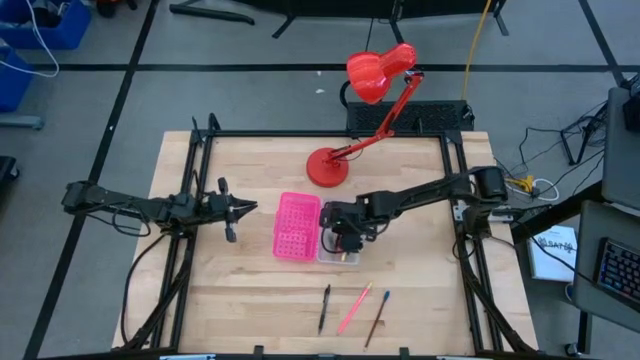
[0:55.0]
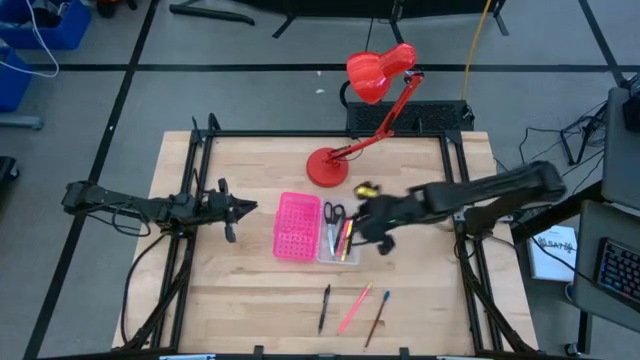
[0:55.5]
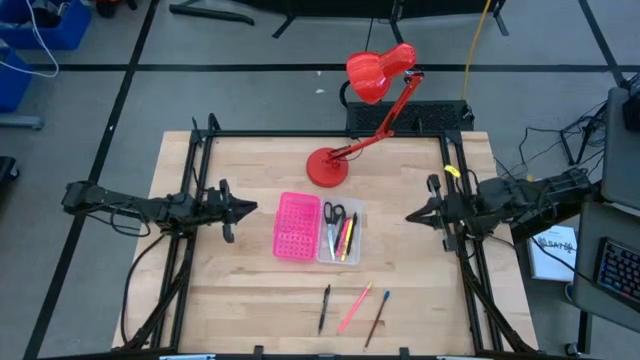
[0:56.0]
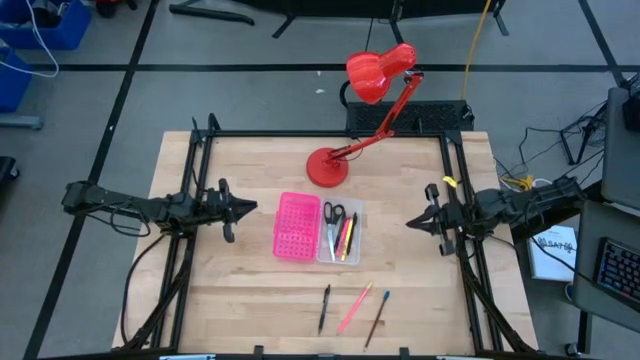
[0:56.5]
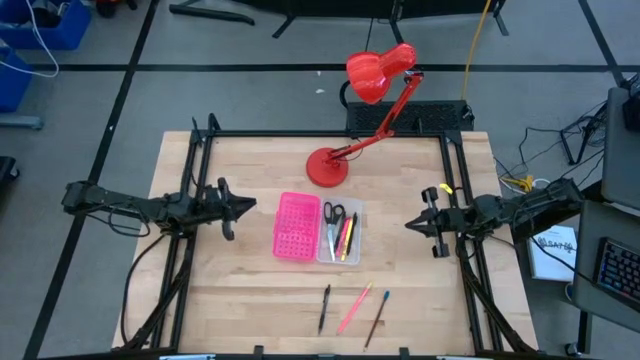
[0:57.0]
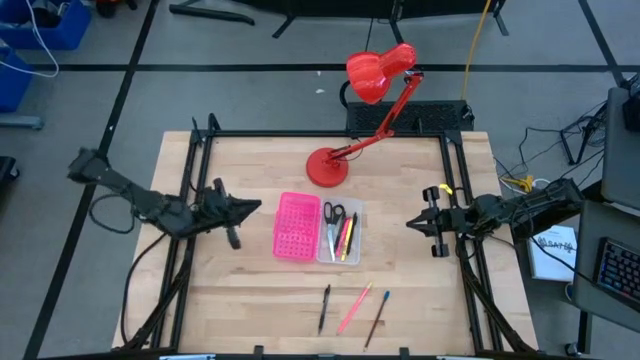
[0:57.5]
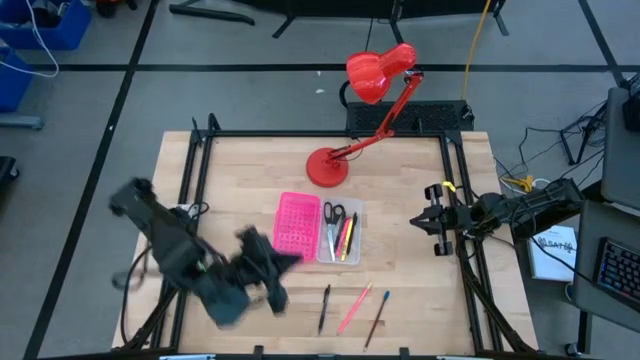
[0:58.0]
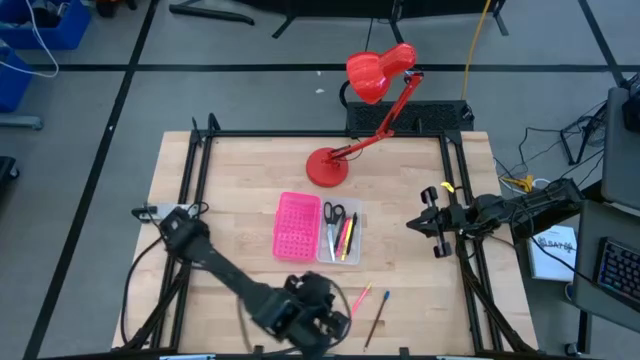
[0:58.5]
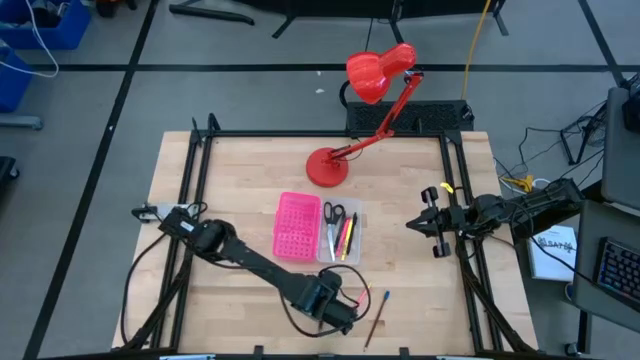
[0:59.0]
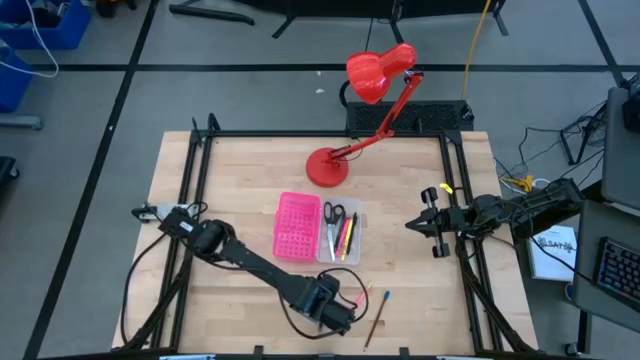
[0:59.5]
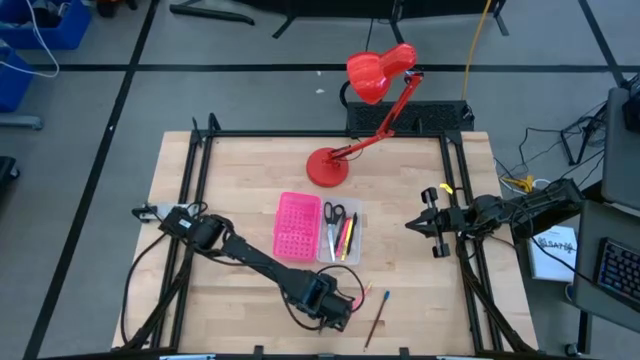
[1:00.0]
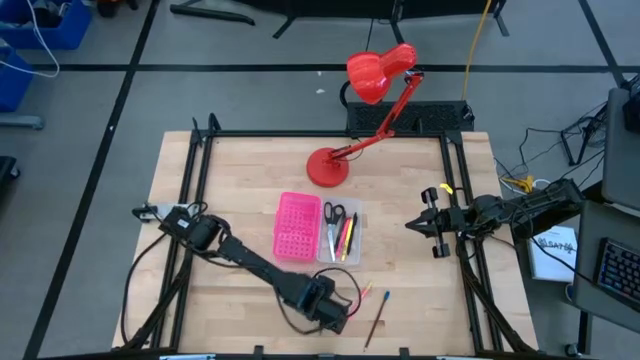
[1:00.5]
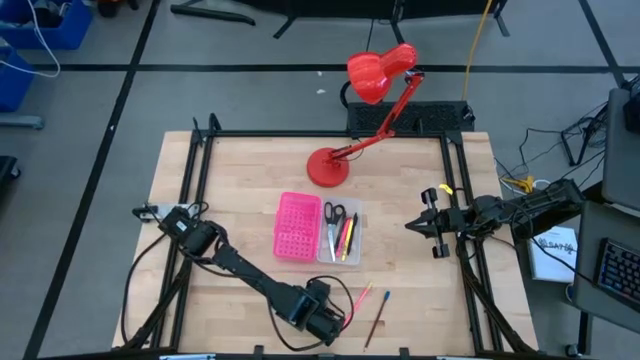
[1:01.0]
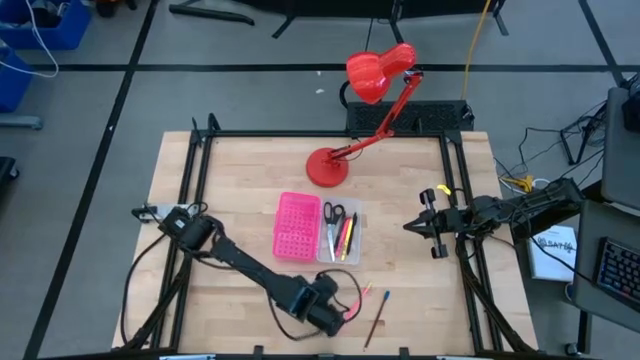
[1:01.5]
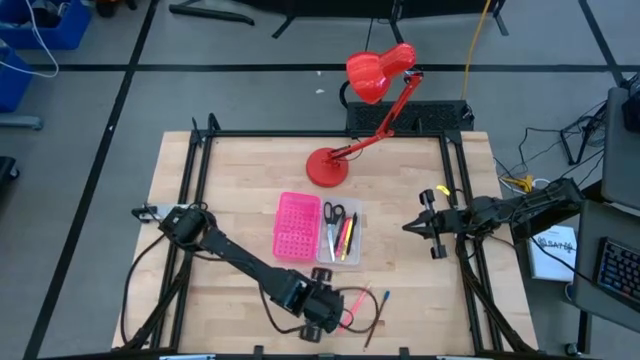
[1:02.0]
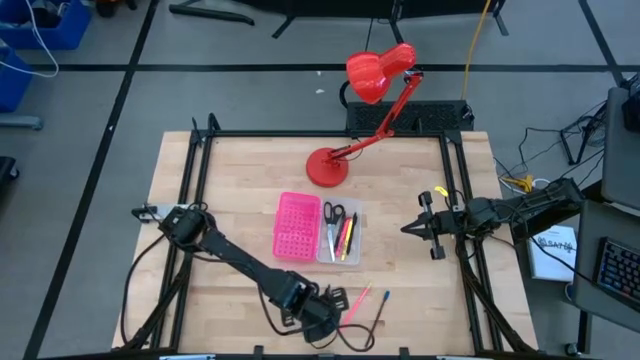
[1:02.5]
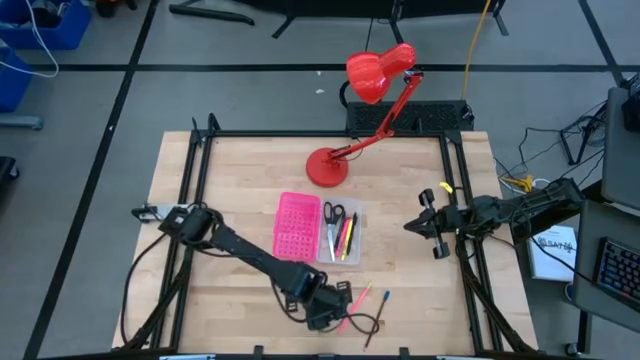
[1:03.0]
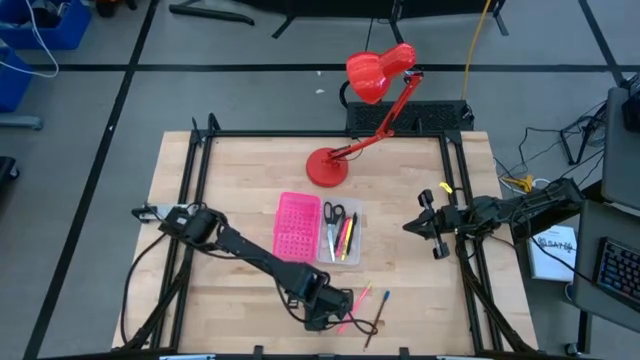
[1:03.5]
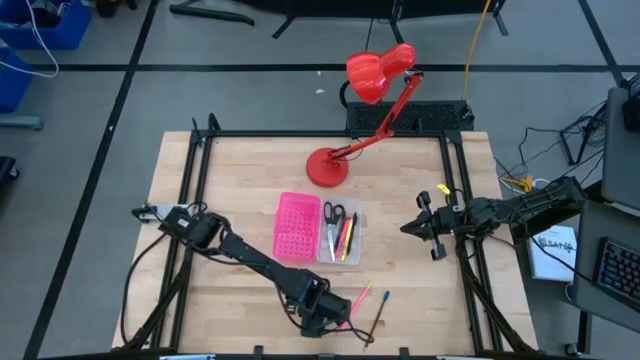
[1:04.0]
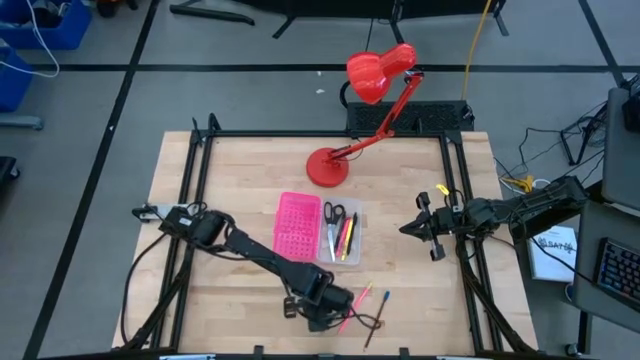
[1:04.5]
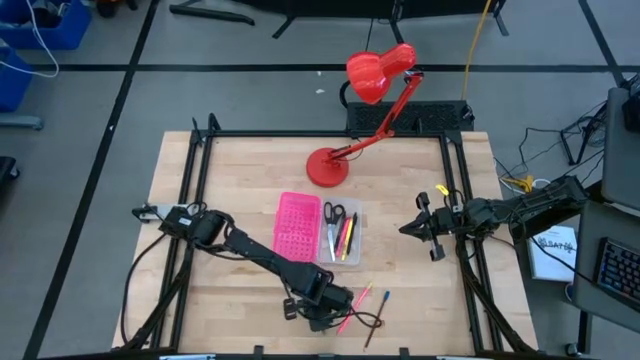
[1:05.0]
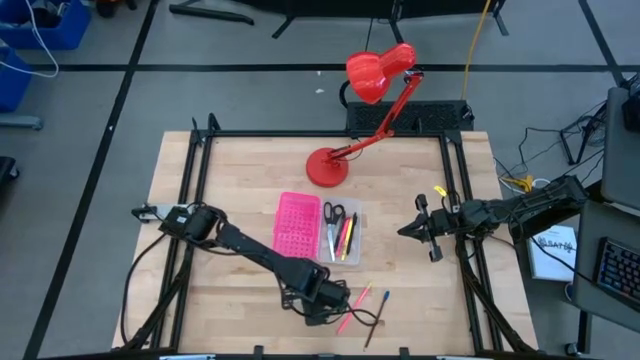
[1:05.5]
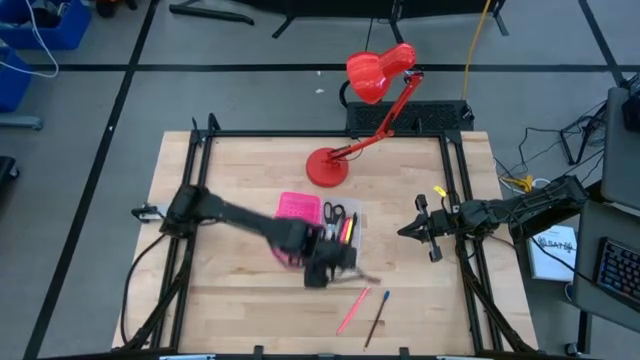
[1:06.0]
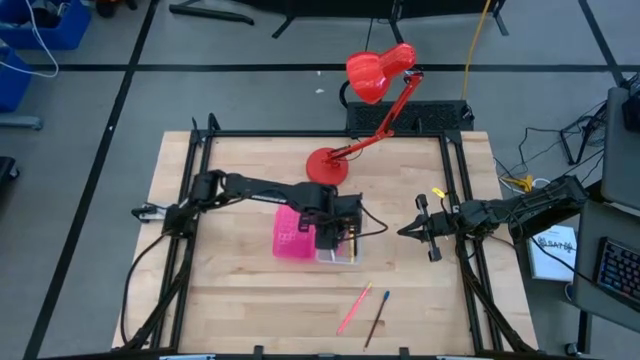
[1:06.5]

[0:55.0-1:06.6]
Task: Pick & place school supplies into a supply box
Put the black pen into the pink supply box

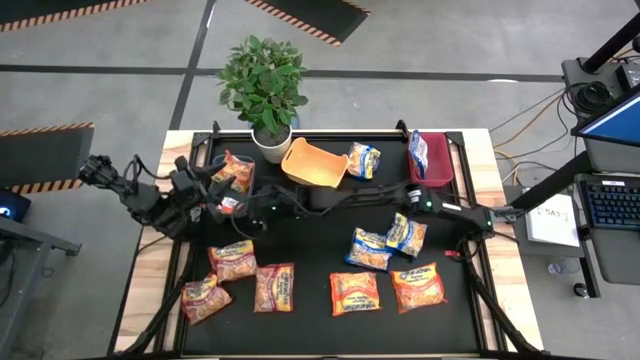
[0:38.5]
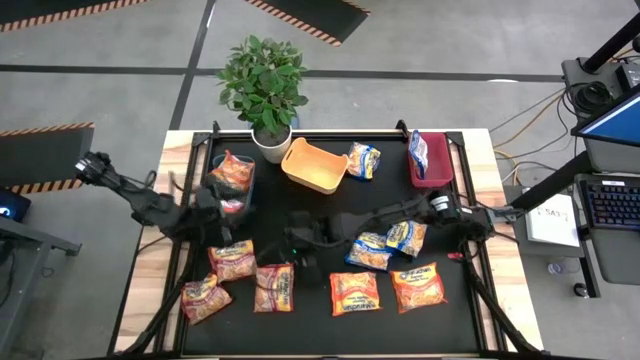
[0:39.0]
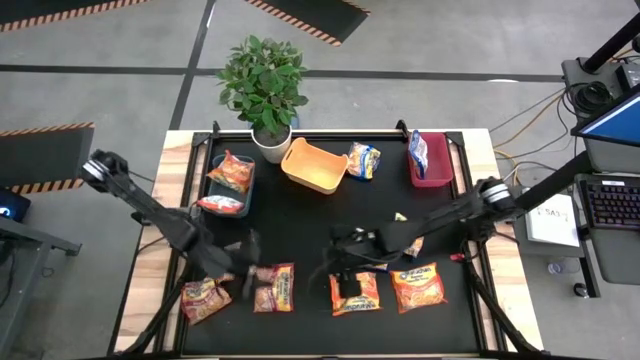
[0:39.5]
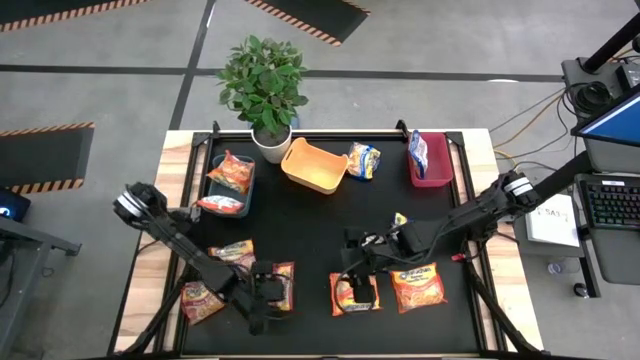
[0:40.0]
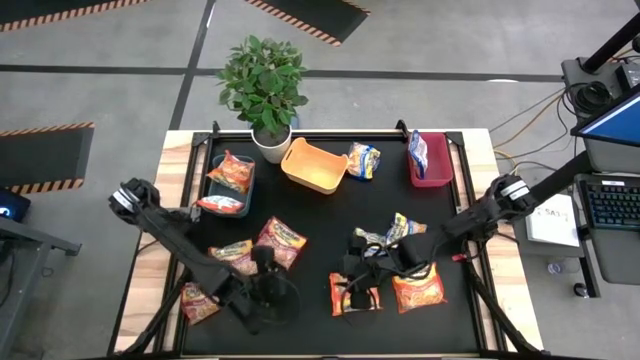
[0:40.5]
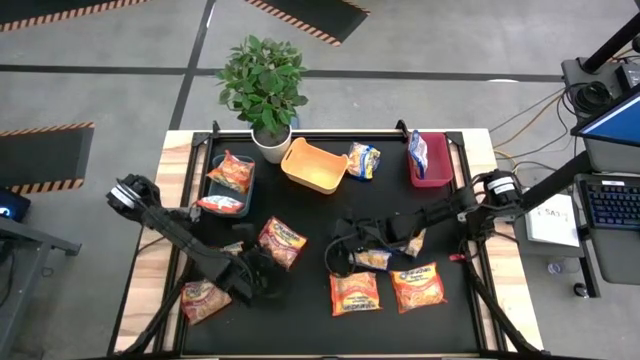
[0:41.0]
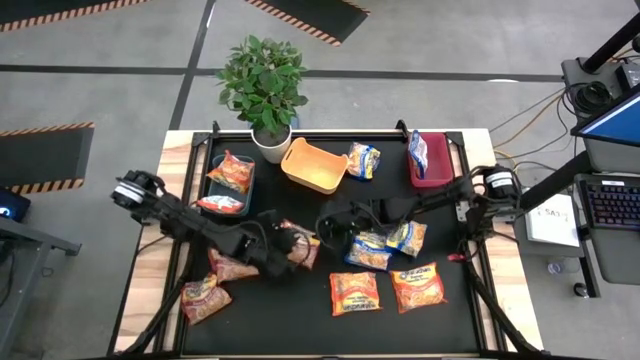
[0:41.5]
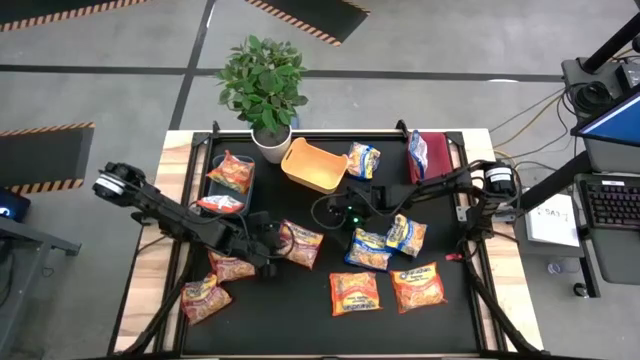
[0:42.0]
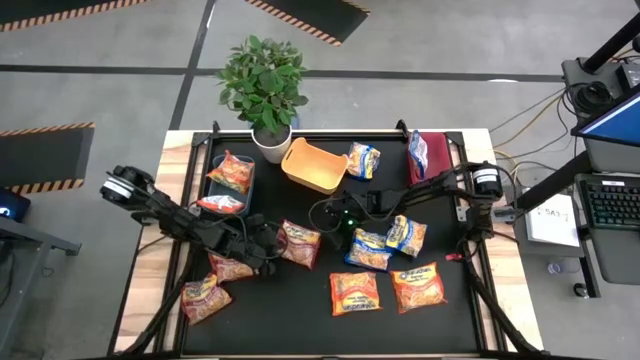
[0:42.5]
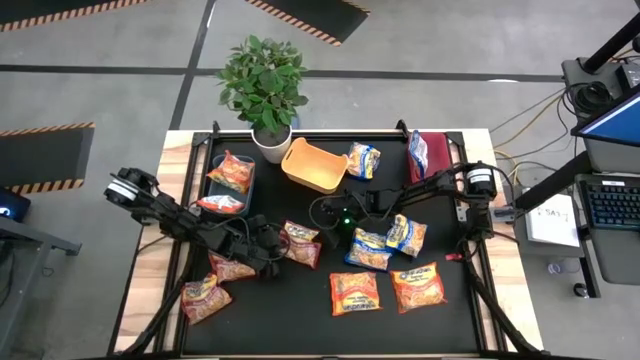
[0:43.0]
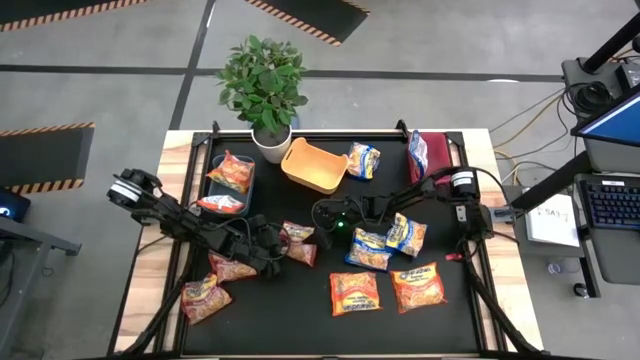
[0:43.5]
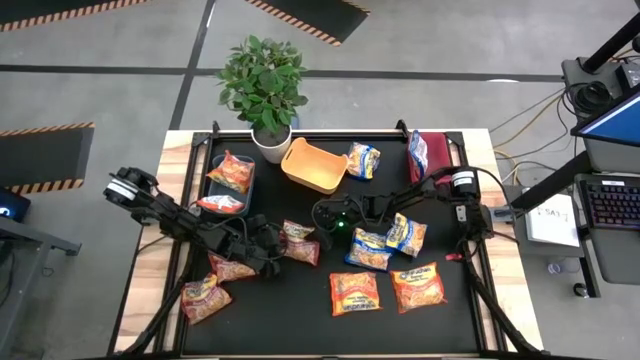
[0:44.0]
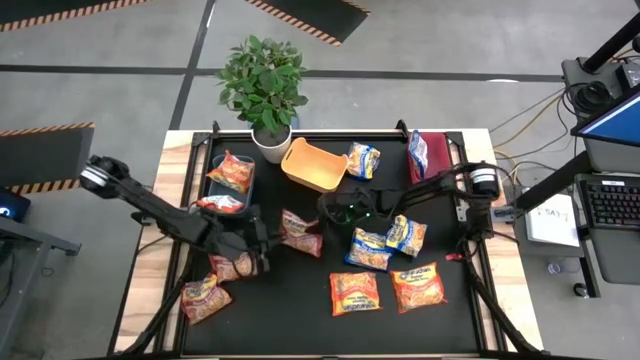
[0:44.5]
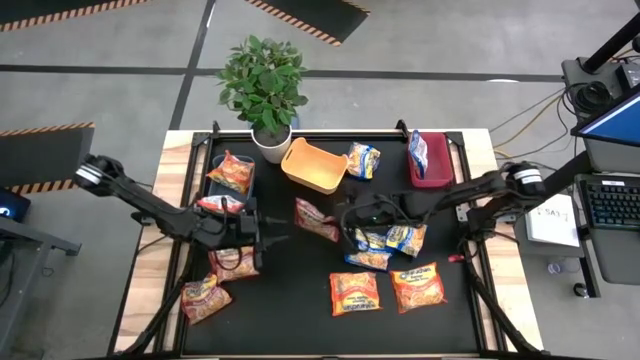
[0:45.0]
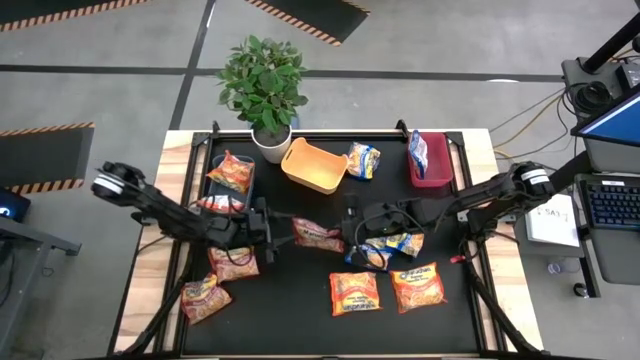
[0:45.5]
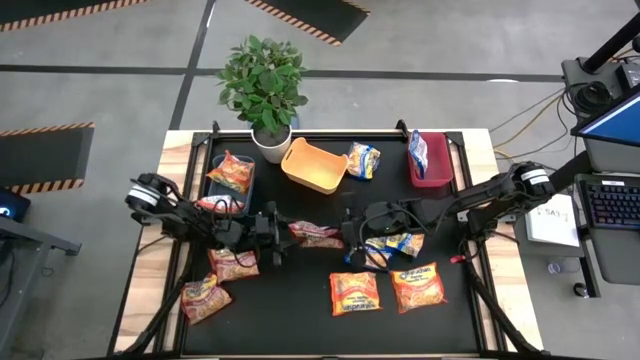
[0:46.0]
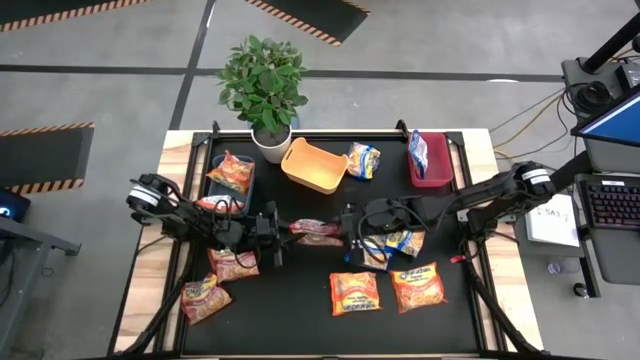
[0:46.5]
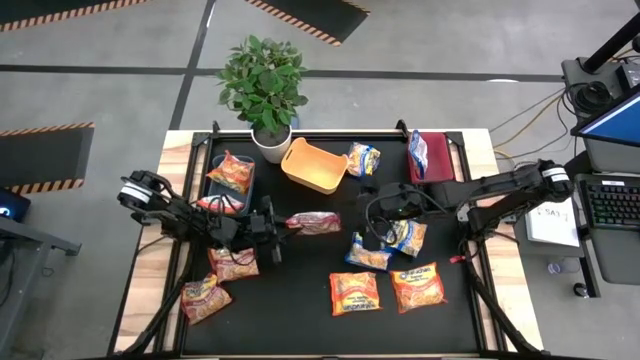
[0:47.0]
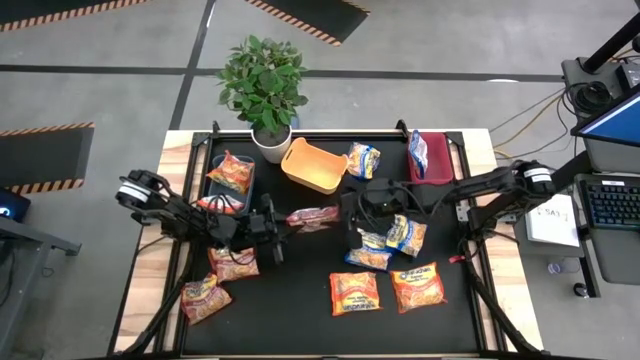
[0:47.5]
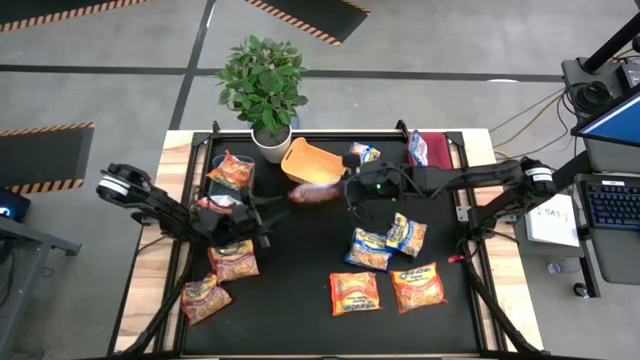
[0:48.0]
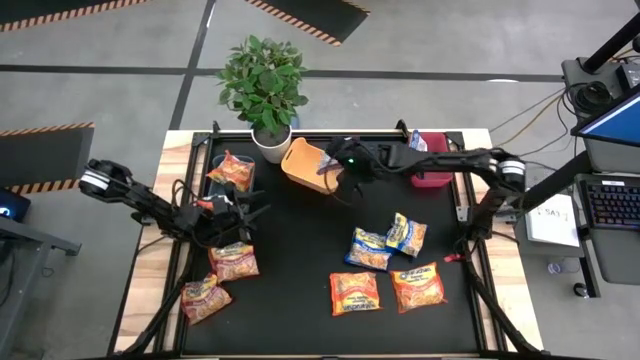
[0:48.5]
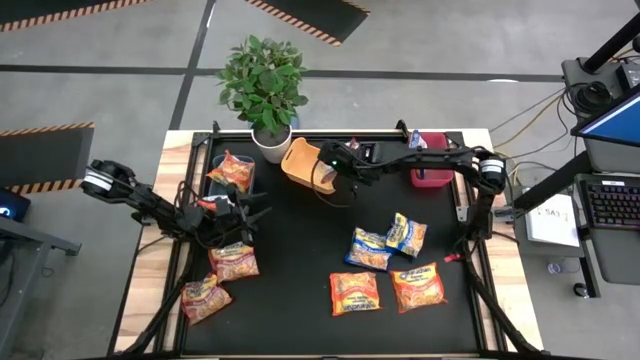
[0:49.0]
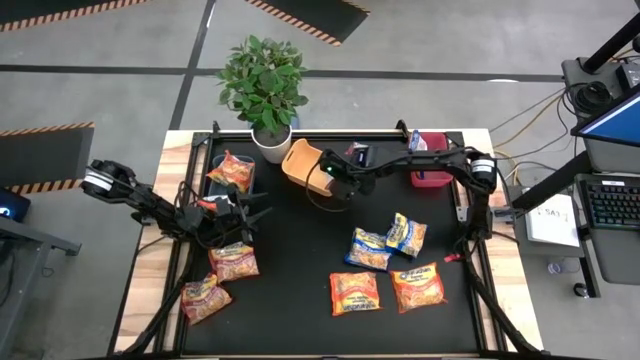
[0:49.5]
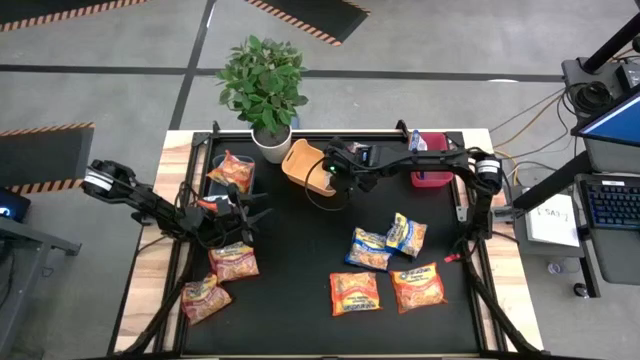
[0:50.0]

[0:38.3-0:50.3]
Task: Sort Maruchan noodles
Put the bottom right red noodle pack into the yellow bin
